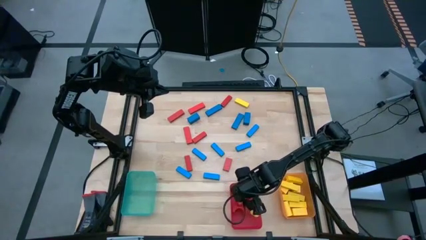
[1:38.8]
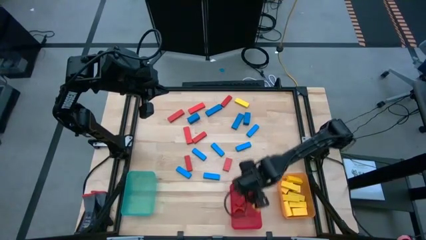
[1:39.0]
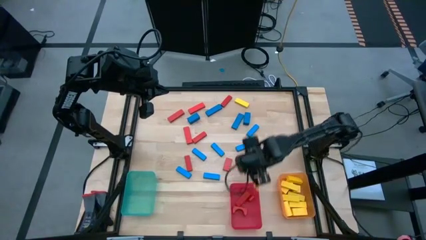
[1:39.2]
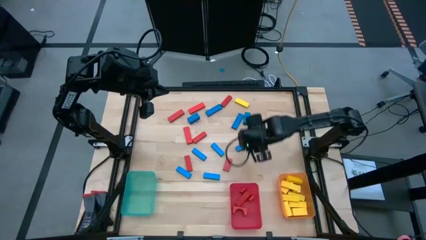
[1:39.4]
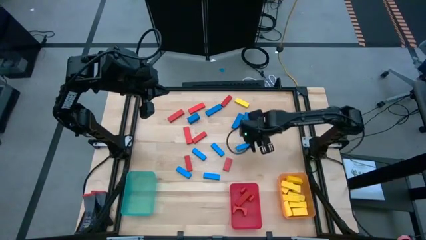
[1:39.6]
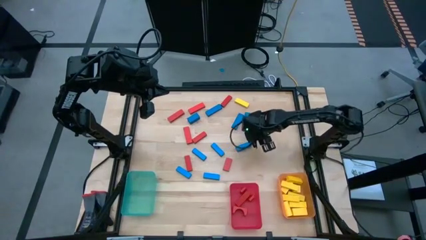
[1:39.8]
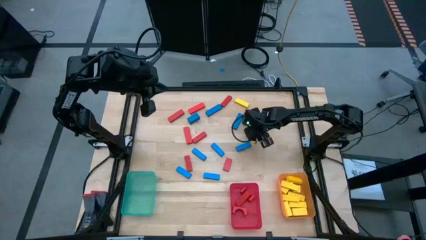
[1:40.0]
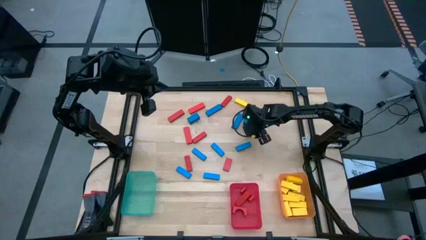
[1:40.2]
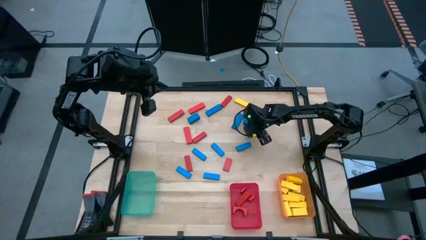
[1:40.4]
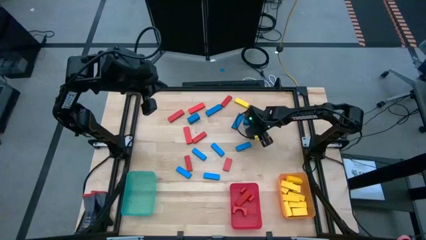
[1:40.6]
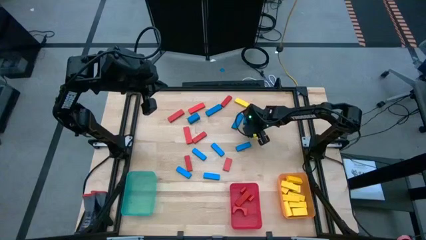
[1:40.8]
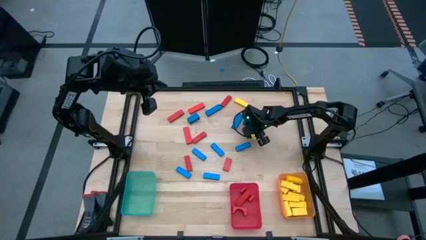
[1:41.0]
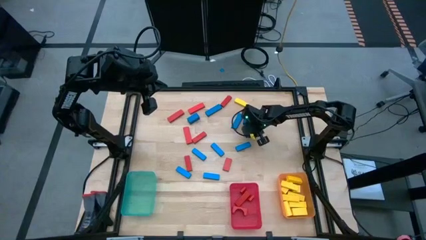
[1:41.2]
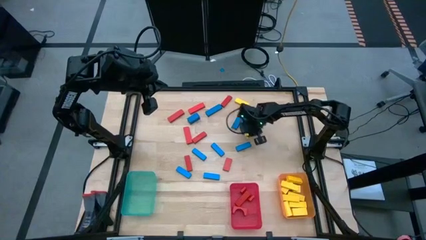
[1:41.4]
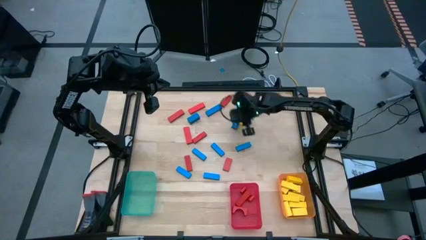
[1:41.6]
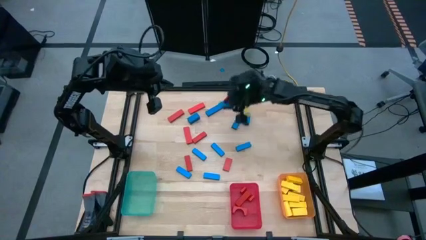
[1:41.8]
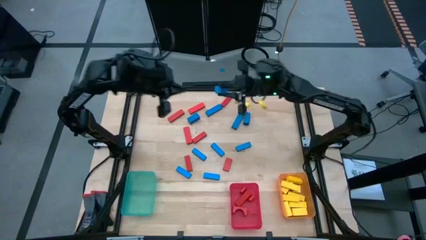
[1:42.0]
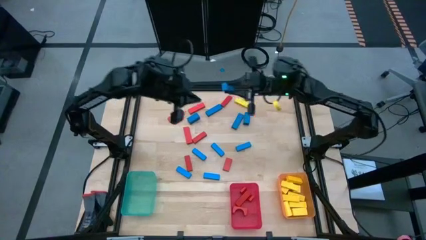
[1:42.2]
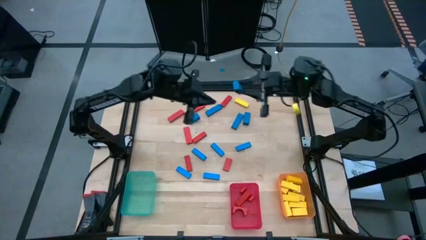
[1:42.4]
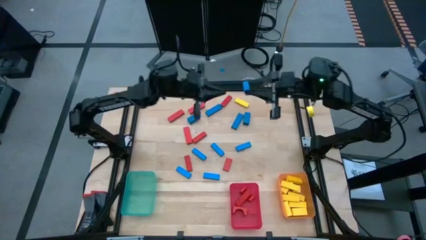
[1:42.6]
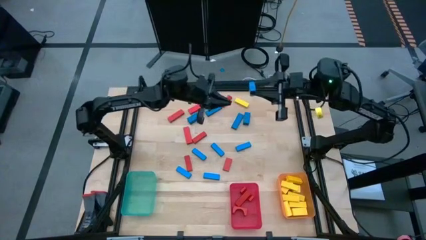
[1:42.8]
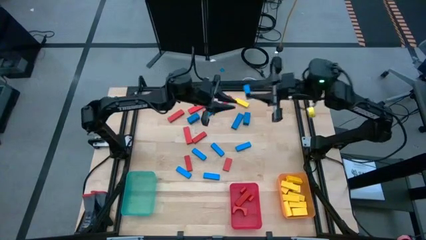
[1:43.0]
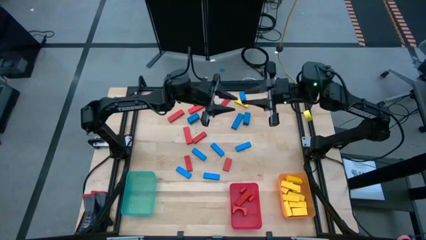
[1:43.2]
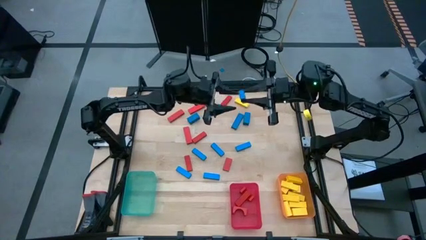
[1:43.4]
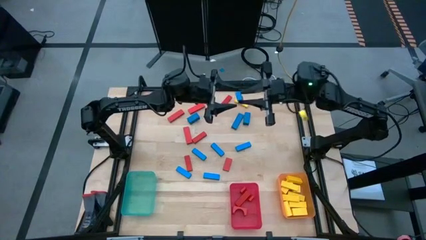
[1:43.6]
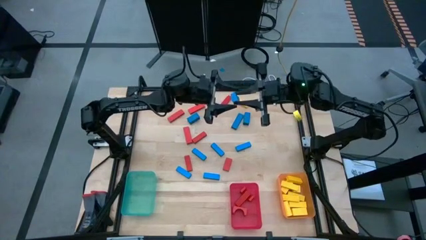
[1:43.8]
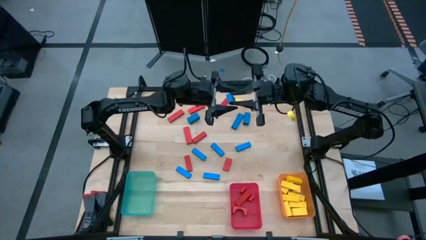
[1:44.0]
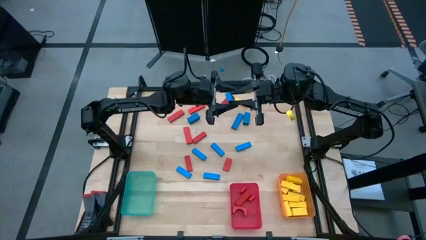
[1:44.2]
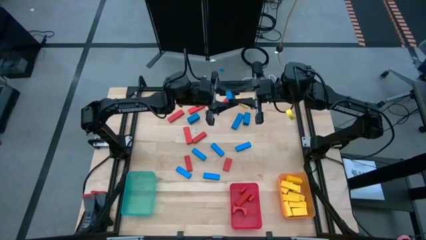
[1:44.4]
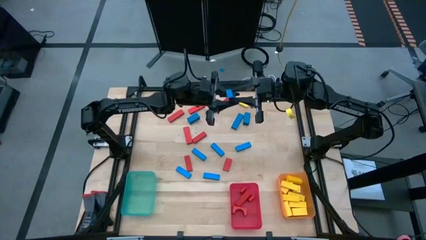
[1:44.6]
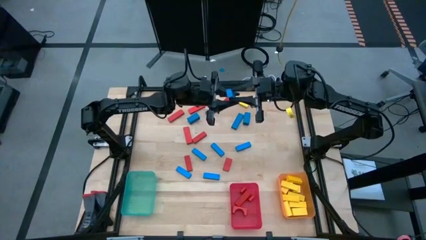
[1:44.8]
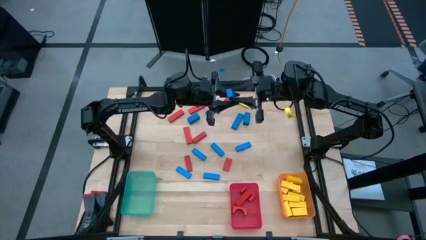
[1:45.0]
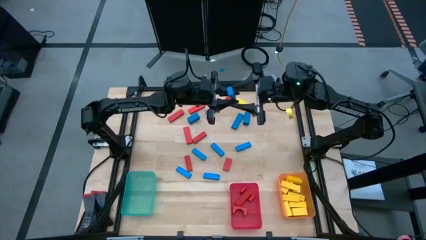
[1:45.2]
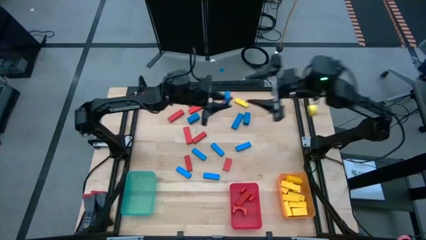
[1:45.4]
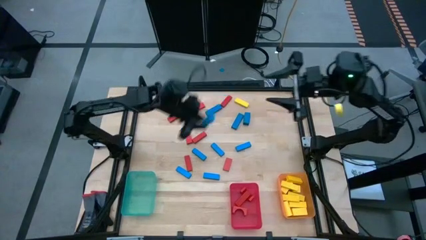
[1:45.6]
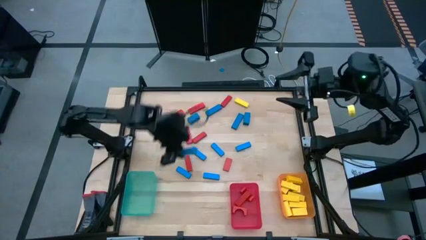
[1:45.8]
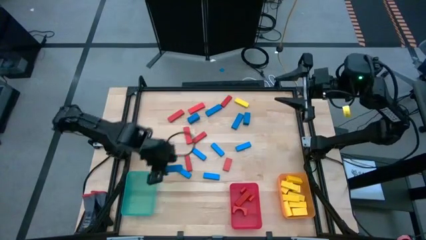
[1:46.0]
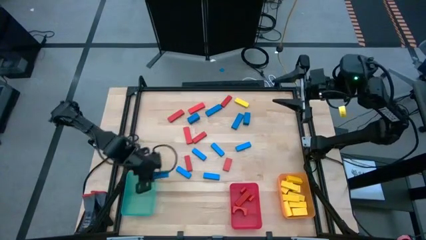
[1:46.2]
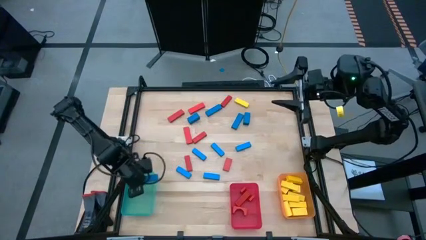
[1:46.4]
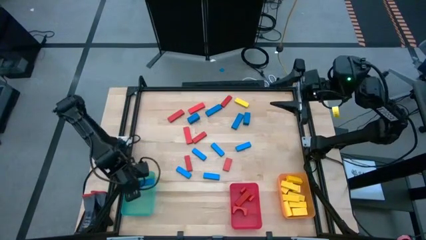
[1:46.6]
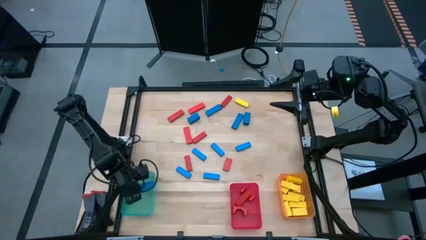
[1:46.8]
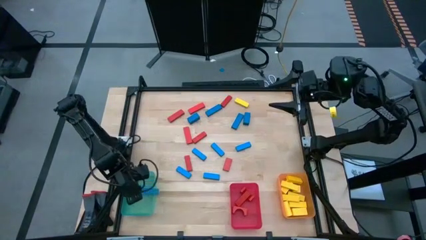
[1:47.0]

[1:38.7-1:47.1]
Task: Sort blocks
Put the blue block into the blue bin

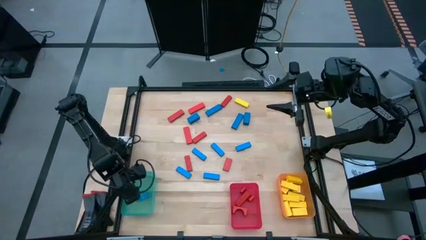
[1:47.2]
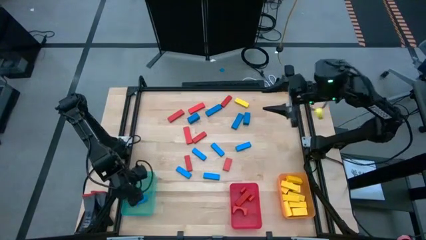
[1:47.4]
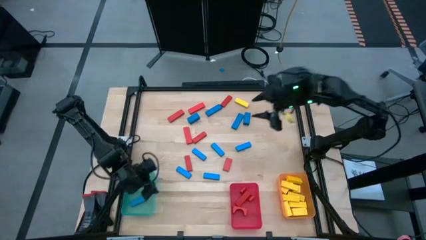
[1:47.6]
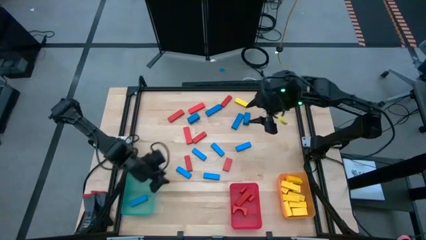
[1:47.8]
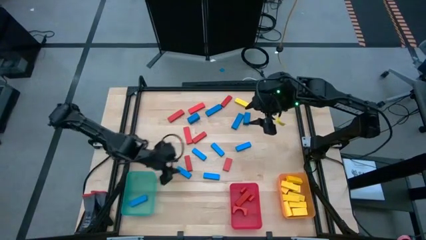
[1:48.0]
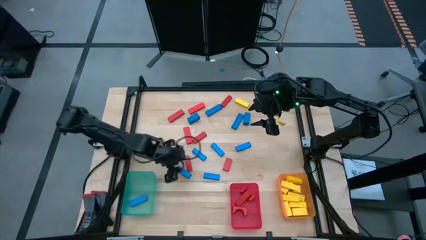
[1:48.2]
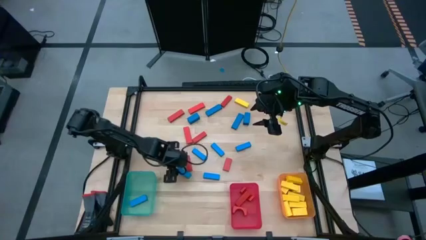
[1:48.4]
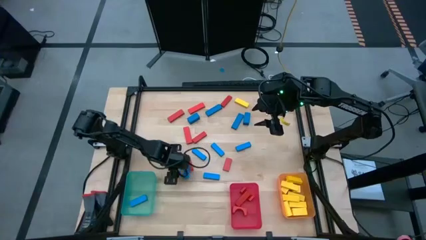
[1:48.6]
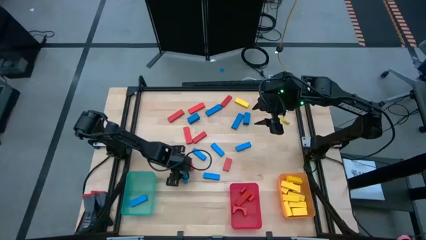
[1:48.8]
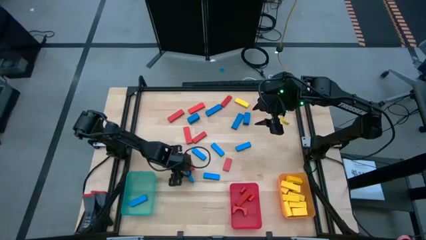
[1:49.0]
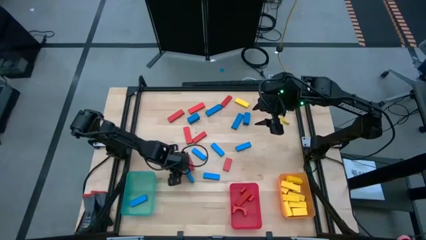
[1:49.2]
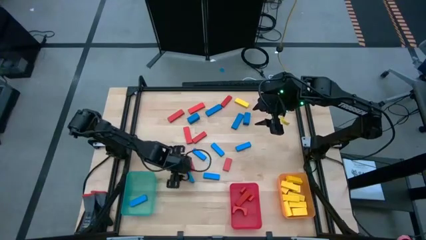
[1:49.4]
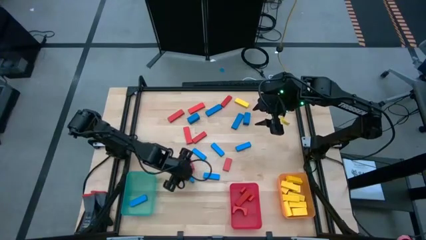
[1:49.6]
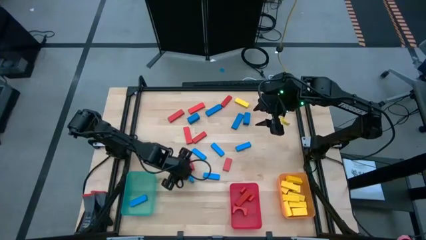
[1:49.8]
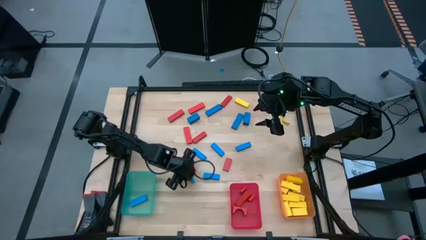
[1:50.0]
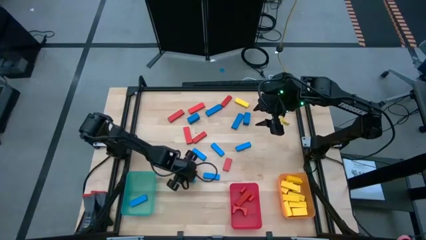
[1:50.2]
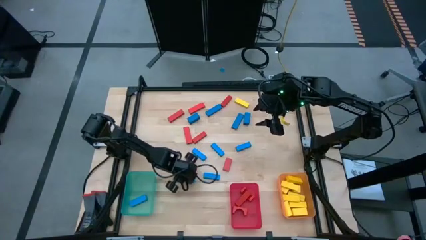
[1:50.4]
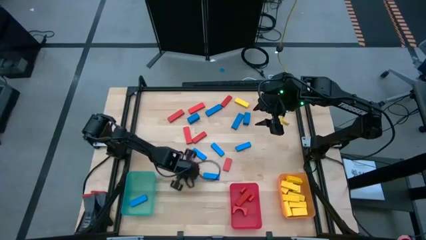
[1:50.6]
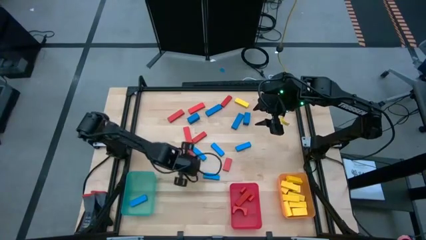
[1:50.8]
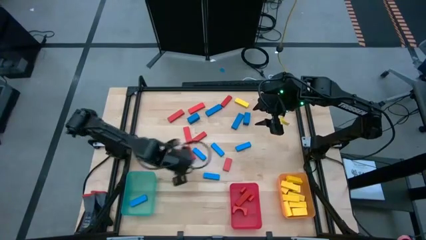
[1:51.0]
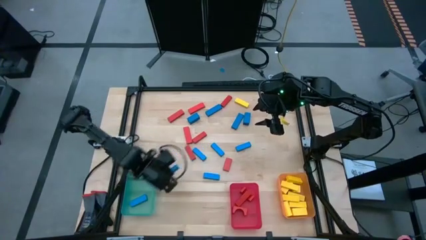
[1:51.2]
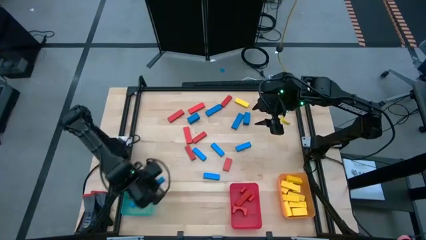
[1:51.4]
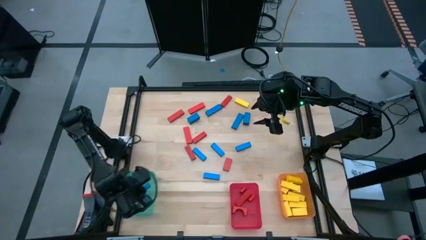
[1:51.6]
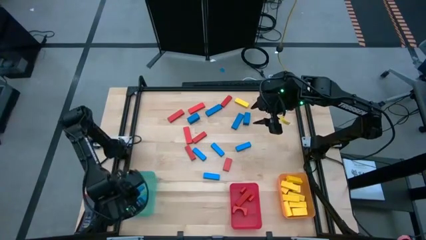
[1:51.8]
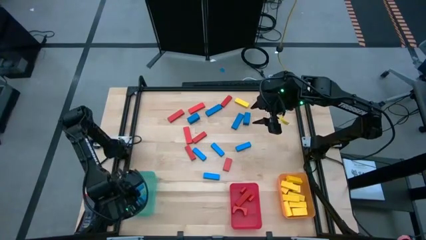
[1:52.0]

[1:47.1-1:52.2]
Put the blue block into the blue bin
